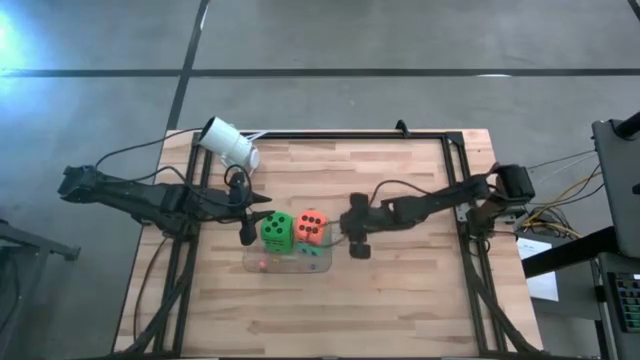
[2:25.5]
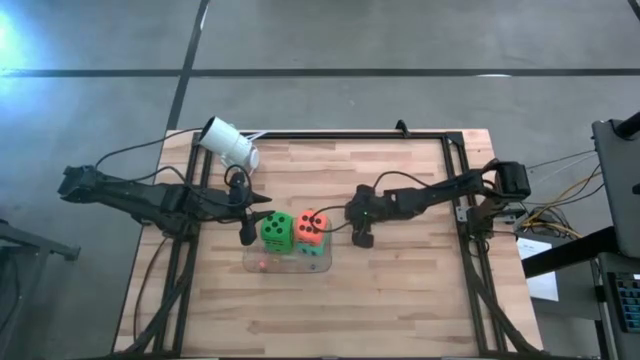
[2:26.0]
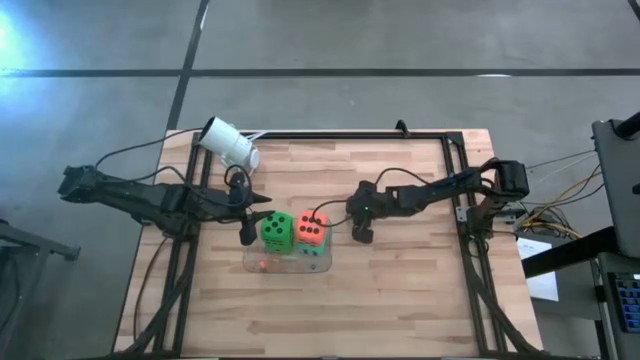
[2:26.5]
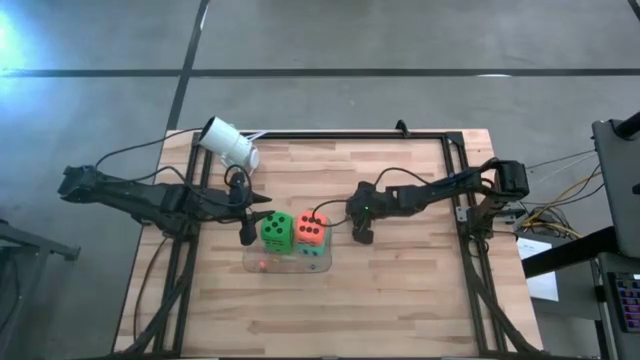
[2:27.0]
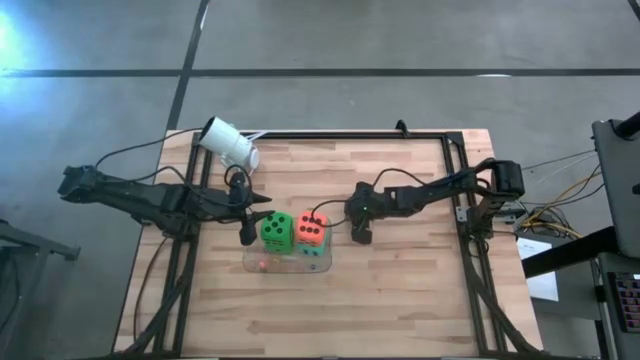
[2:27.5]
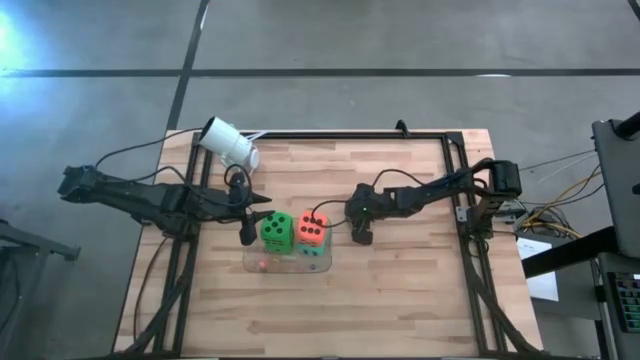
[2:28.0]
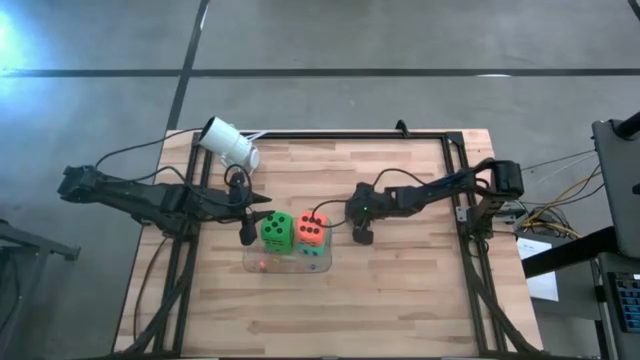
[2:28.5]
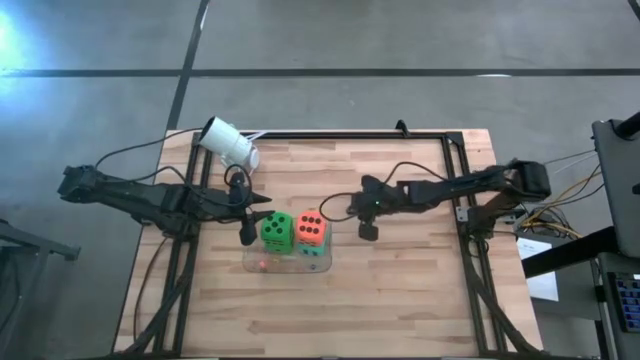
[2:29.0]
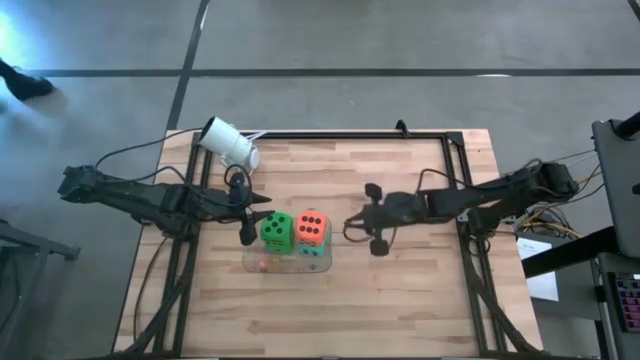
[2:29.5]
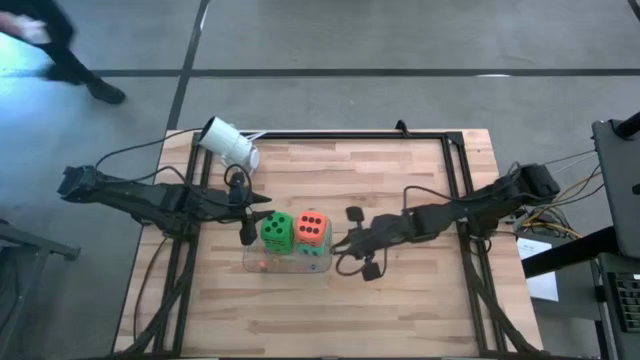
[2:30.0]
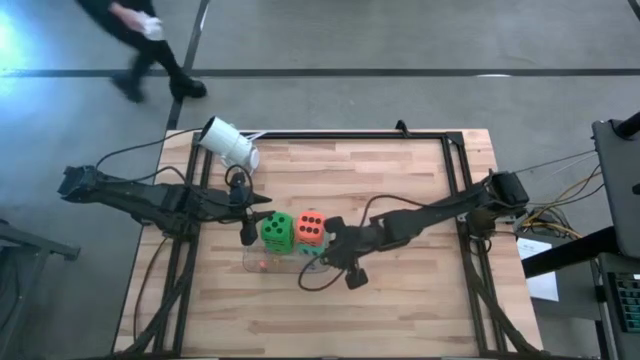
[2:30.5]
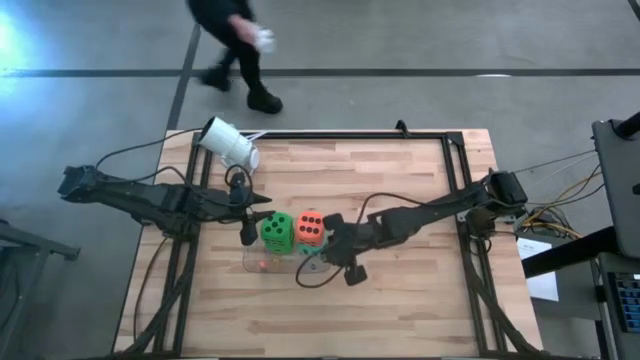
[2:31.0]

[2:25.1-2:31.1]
Task: Pick & Place Dice
Put the small black die into the transparent bin

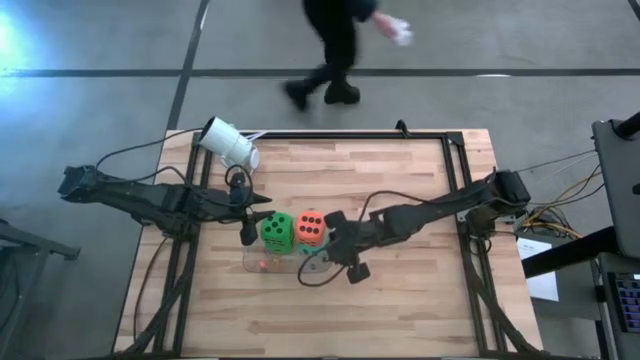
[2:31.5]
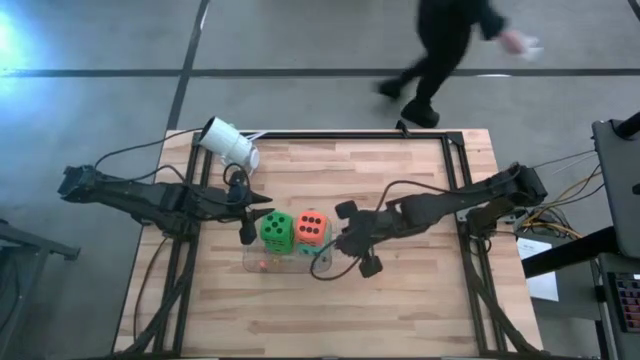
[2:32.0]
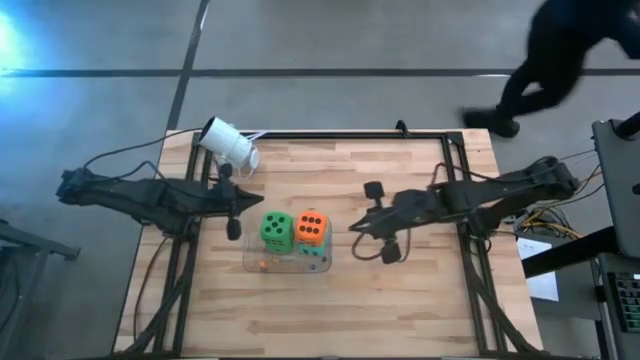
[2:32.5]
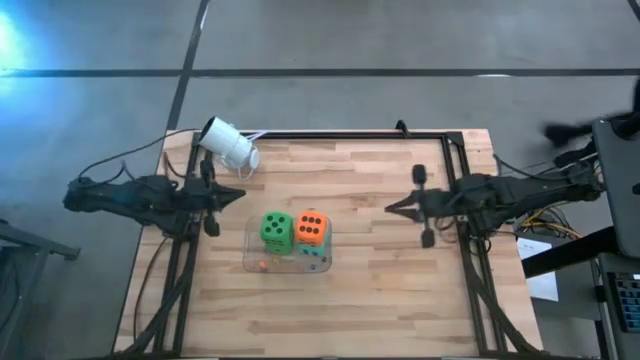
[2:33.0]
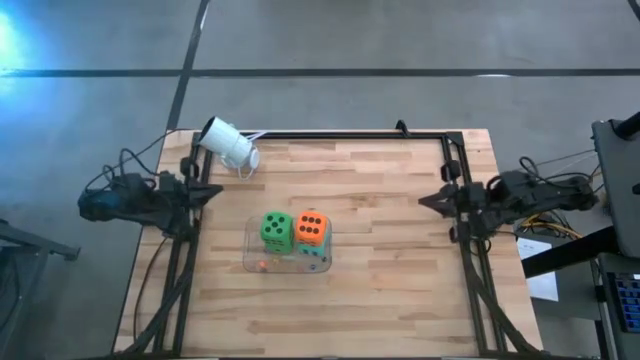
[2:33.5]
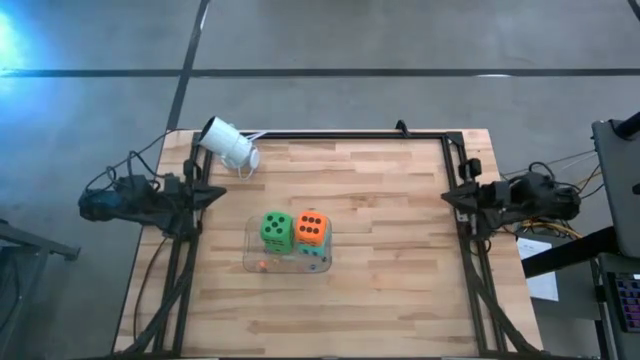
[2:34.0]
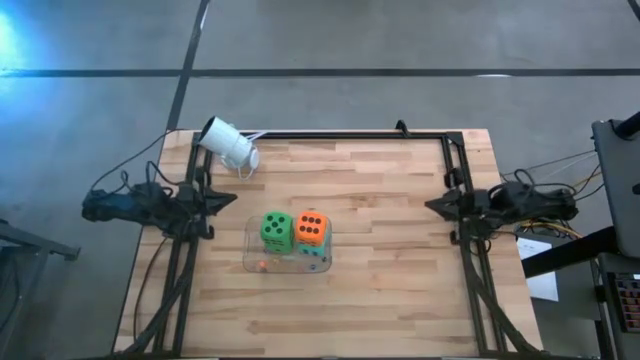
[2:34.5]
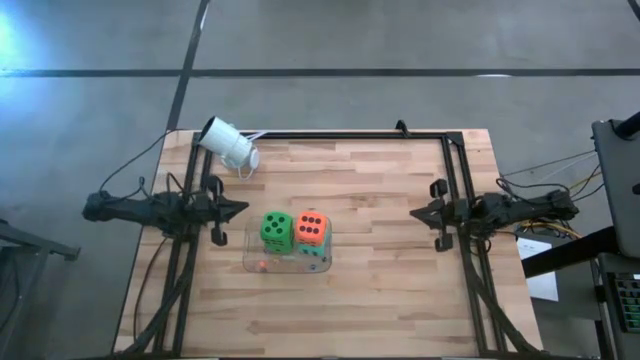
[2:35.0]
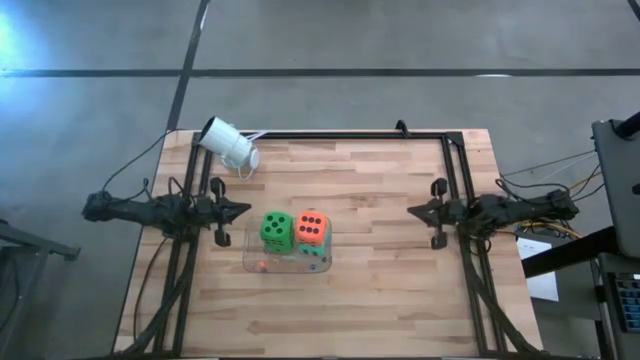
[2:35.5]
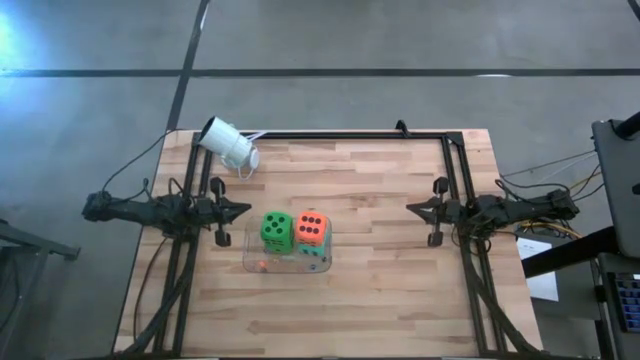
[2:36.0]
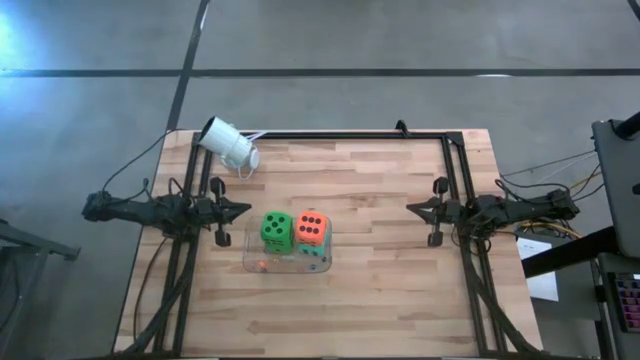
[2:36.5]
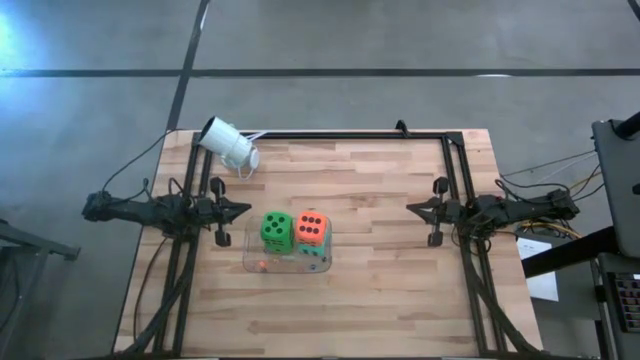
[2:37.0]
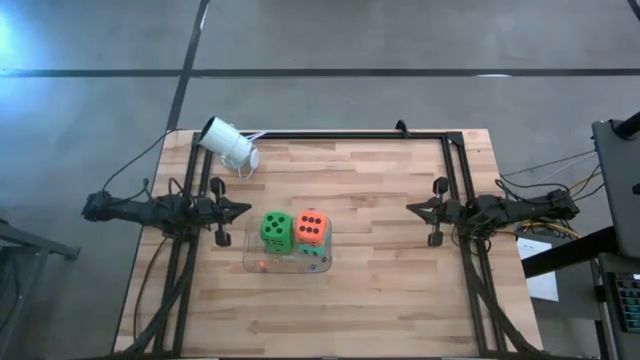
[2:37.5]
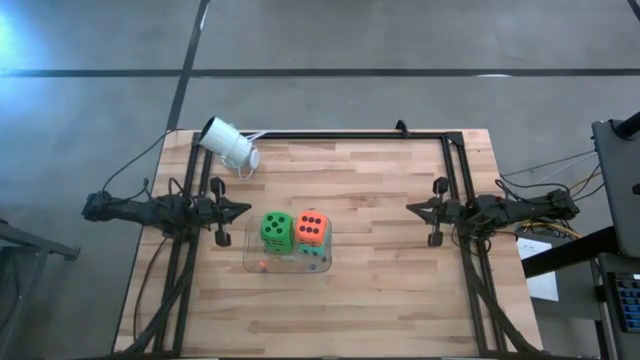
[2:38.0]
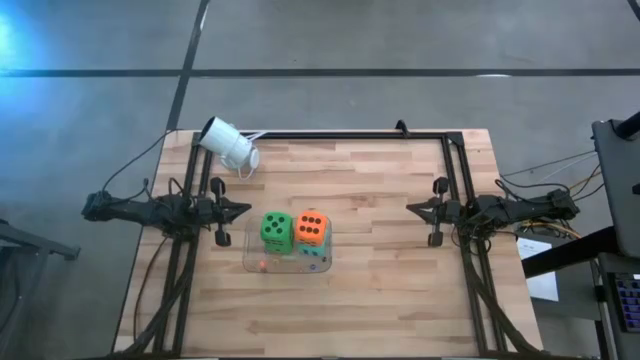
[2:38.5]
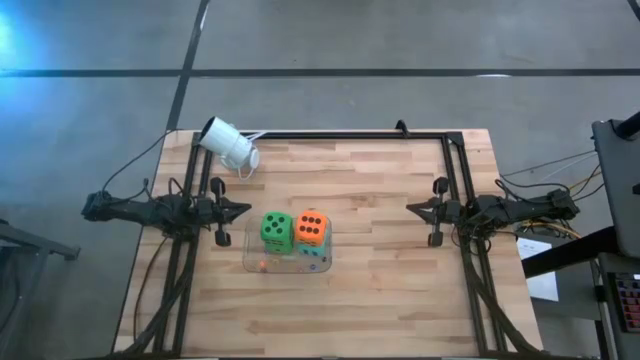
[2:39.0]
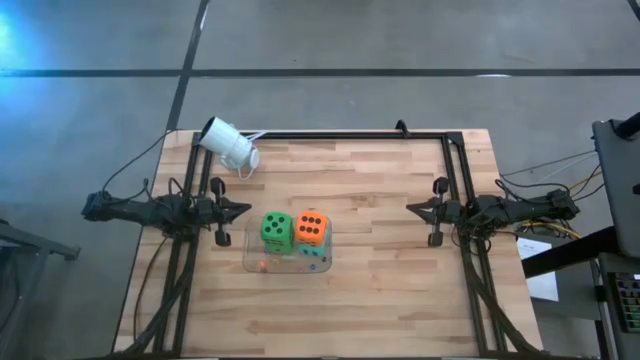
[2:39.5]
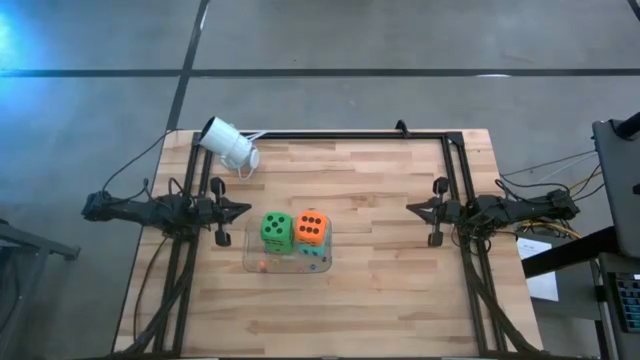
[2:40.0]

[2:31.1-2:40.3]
Return to Home Position

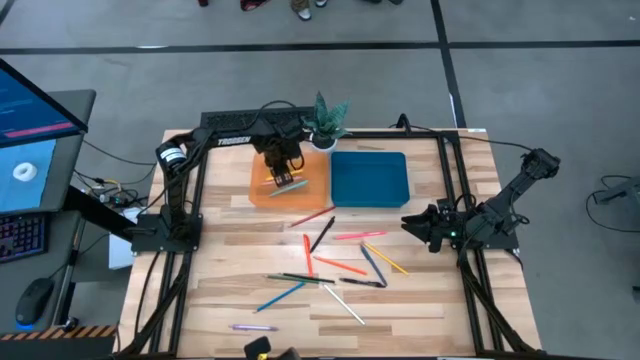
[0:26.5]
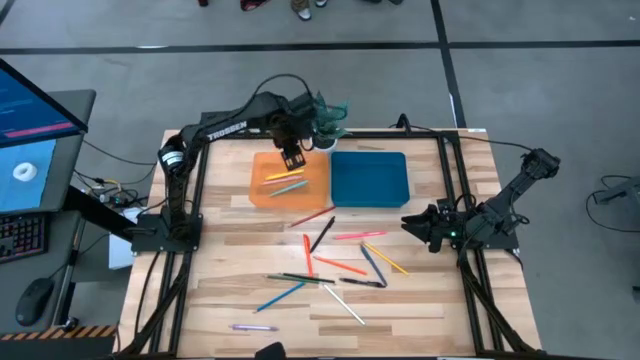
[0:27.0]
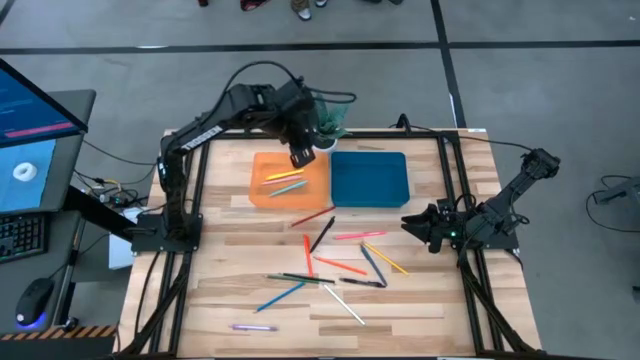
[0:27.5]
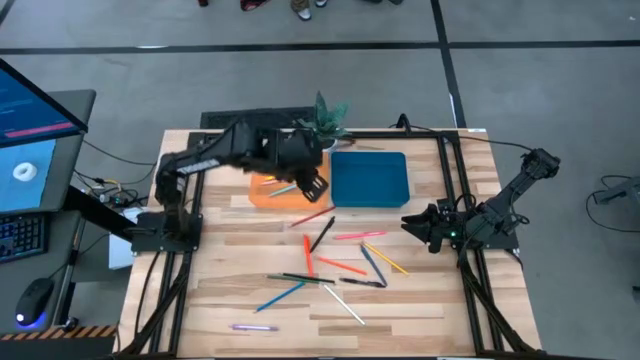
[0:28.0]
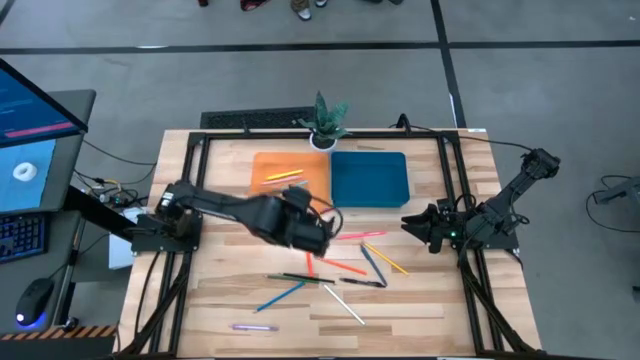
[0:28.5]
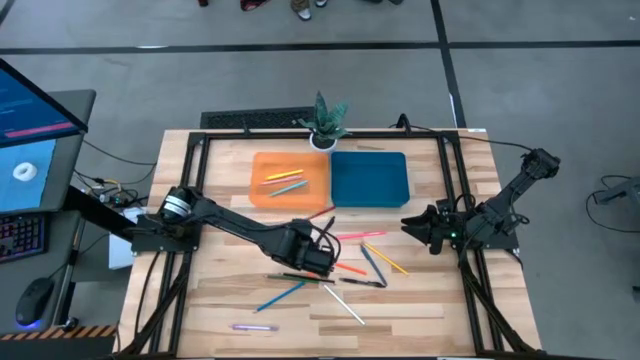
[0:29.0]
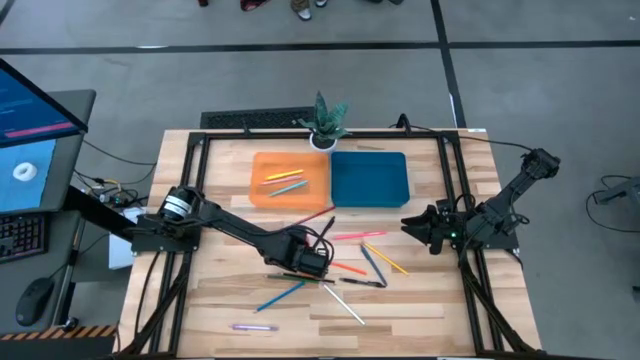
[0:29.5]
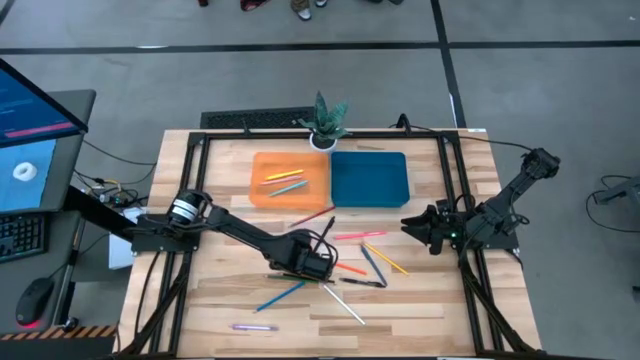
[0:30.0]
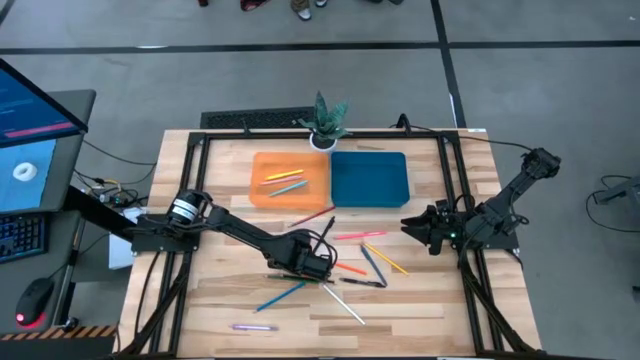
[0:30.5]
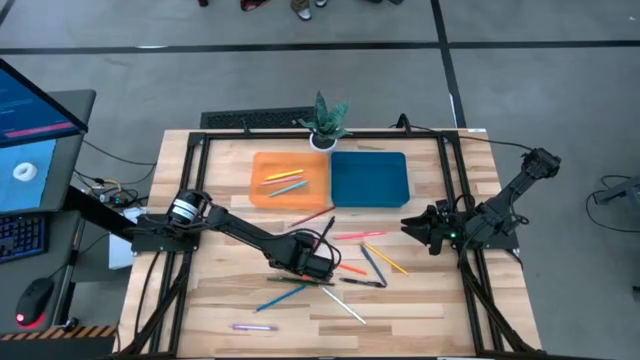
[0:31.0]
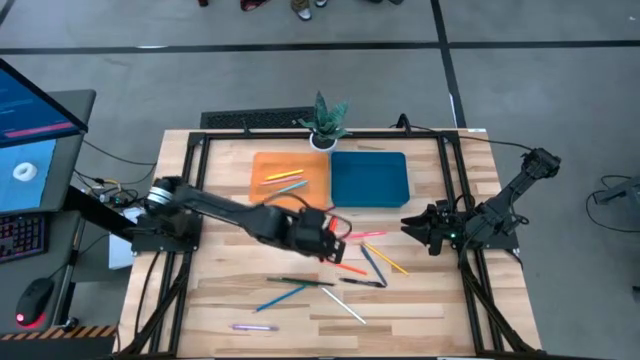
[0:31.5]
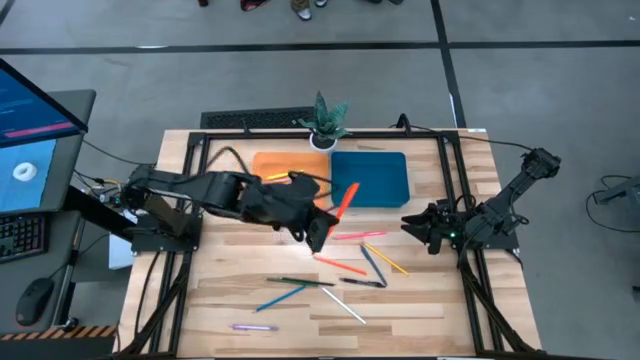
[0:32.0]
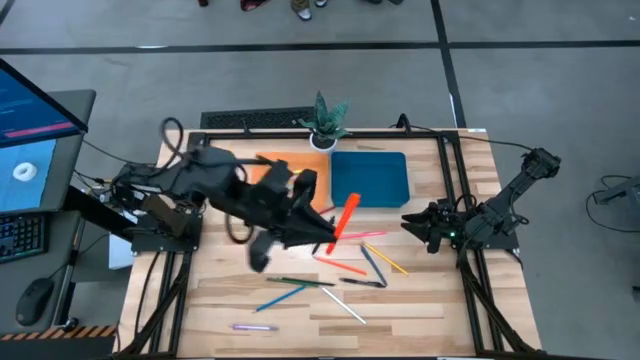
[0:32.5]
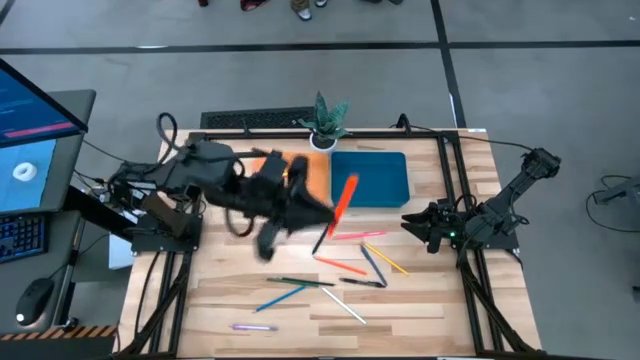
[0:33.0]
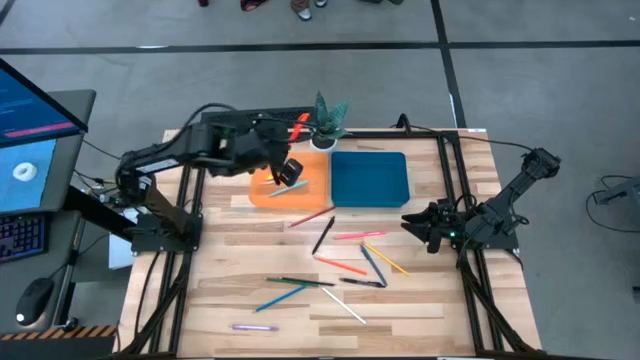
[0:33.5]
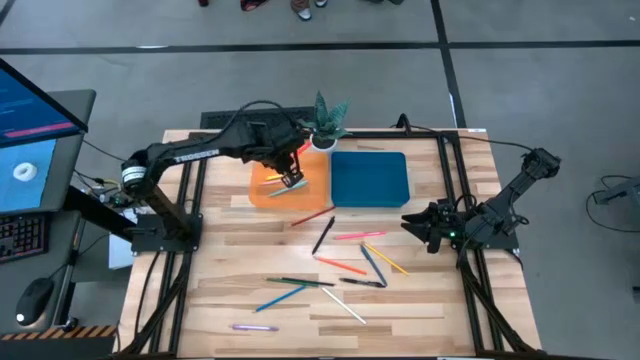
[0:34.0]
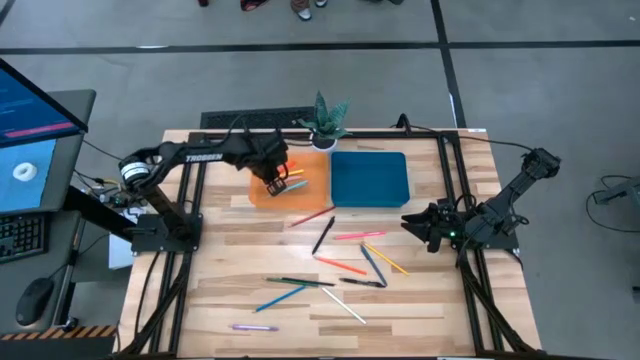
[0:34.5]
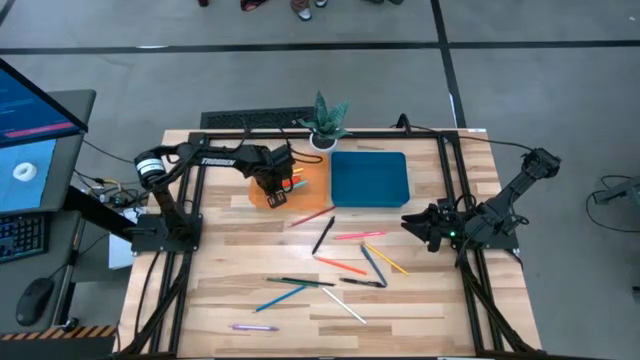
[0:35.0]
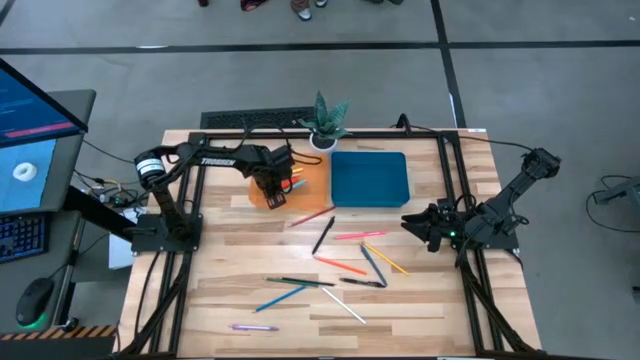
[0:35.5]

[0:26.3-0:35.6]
Task: Sort pens & pencils
Put the orange pen into the orange bin
